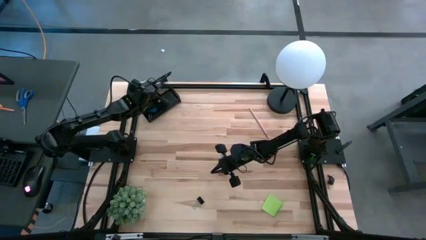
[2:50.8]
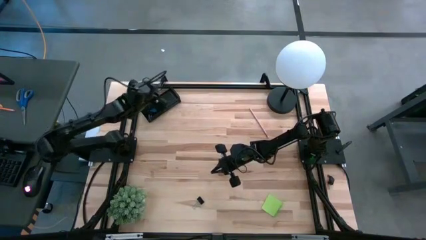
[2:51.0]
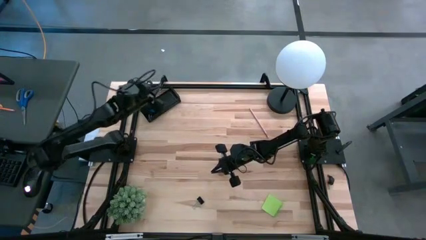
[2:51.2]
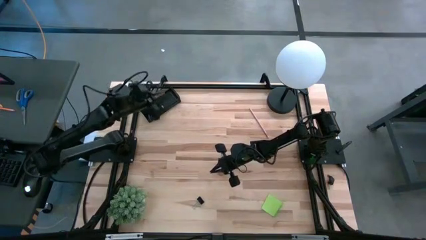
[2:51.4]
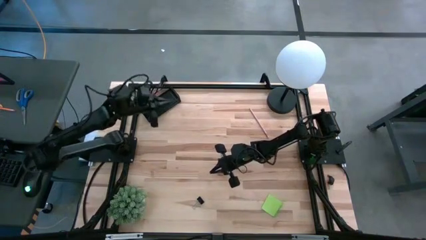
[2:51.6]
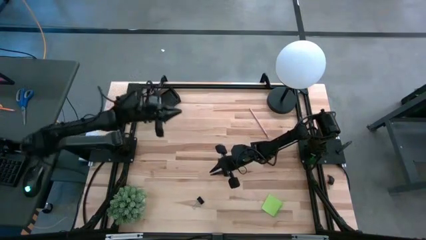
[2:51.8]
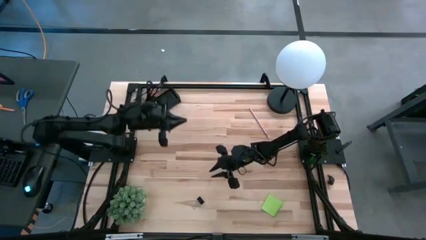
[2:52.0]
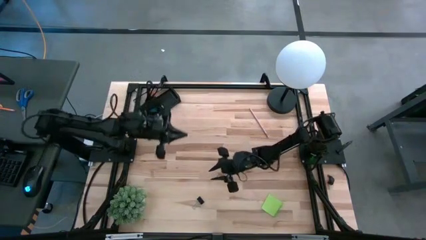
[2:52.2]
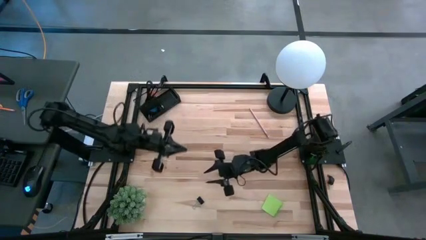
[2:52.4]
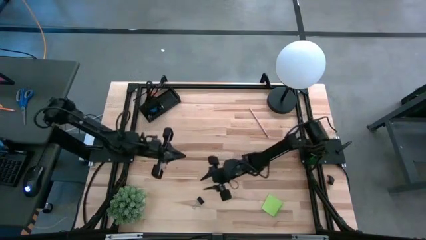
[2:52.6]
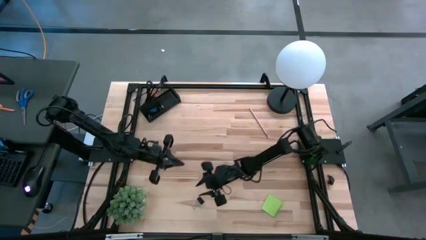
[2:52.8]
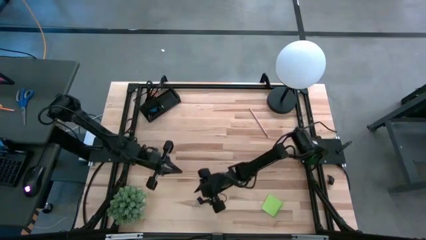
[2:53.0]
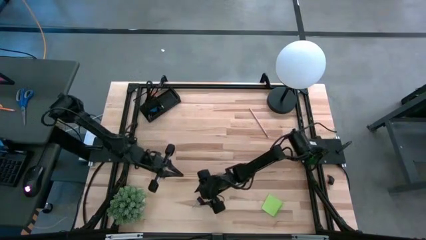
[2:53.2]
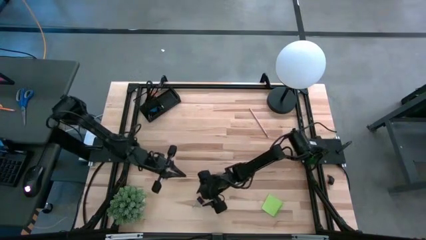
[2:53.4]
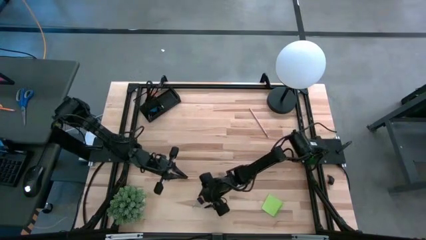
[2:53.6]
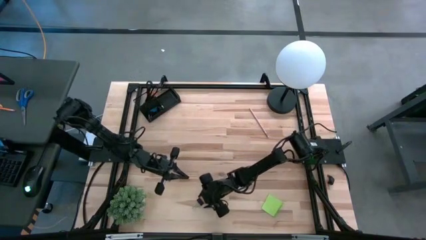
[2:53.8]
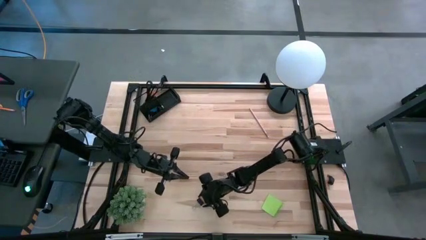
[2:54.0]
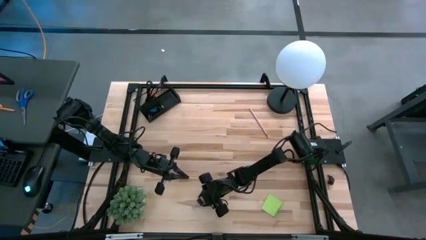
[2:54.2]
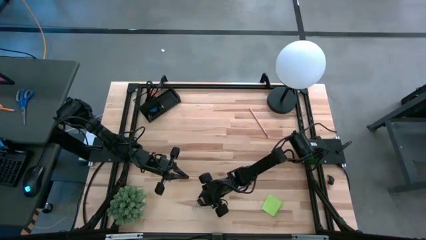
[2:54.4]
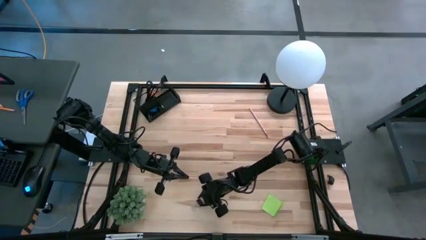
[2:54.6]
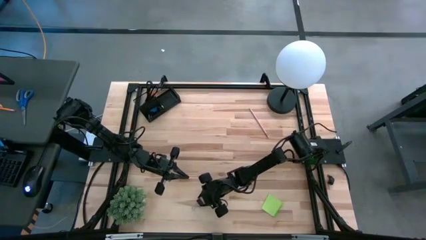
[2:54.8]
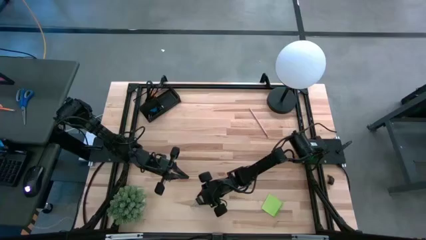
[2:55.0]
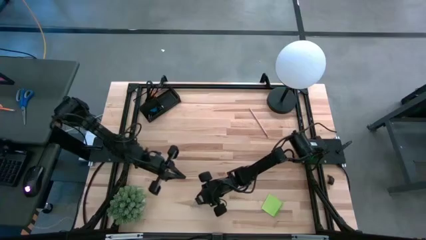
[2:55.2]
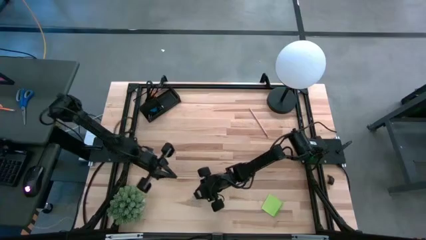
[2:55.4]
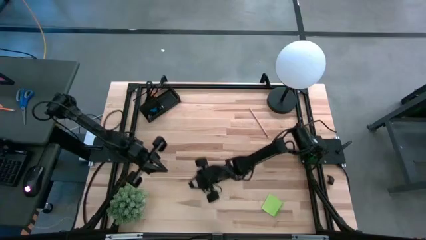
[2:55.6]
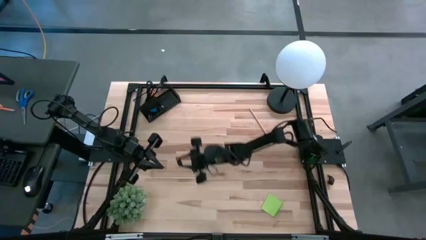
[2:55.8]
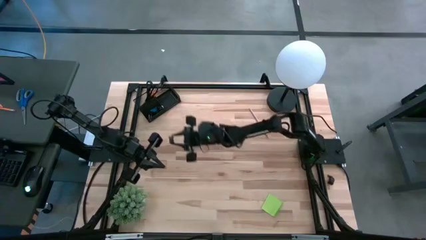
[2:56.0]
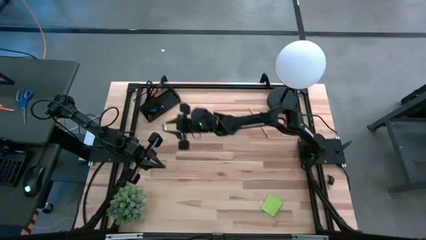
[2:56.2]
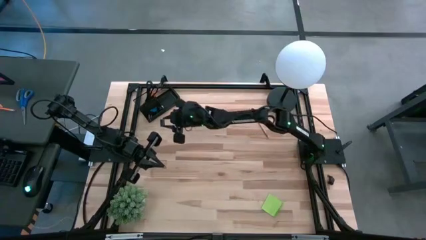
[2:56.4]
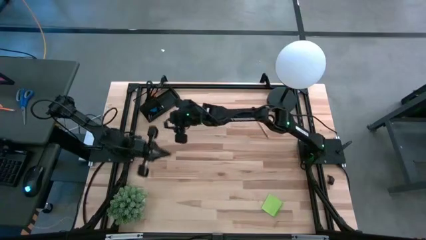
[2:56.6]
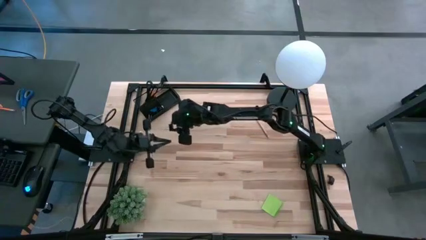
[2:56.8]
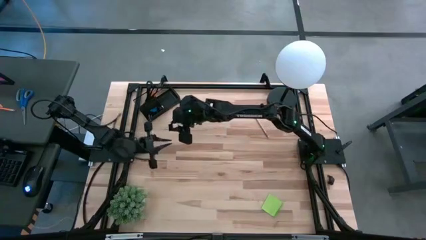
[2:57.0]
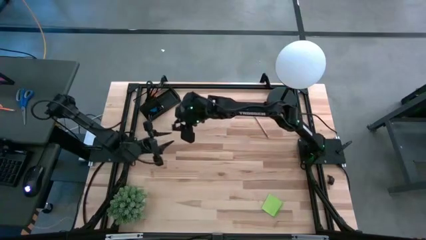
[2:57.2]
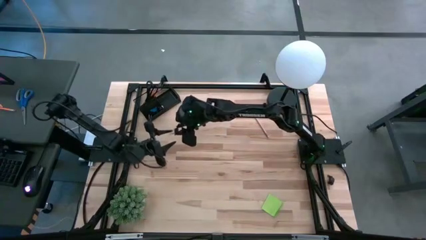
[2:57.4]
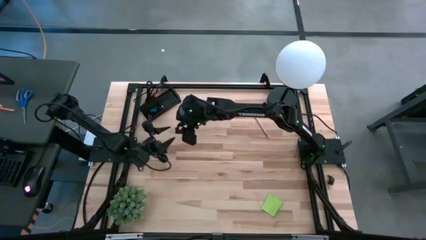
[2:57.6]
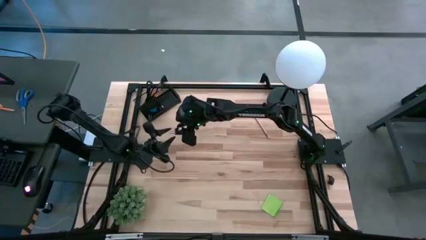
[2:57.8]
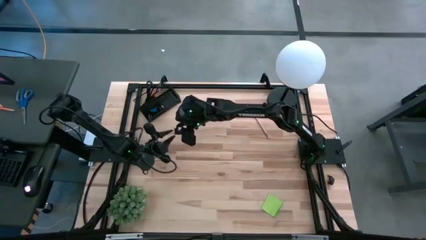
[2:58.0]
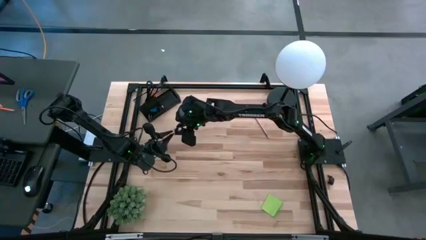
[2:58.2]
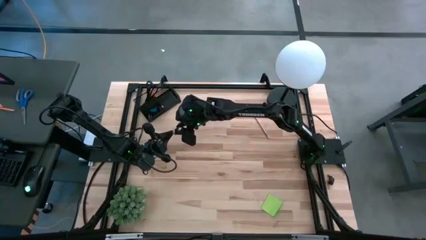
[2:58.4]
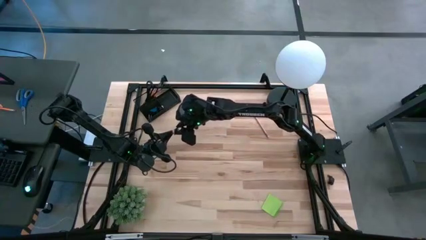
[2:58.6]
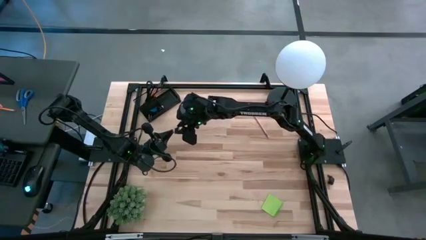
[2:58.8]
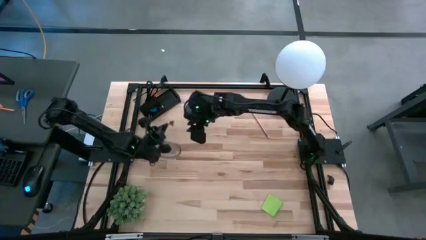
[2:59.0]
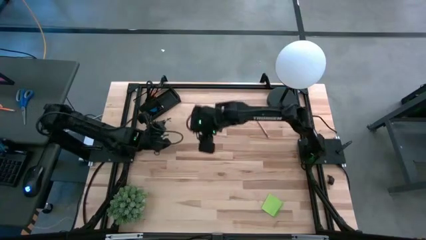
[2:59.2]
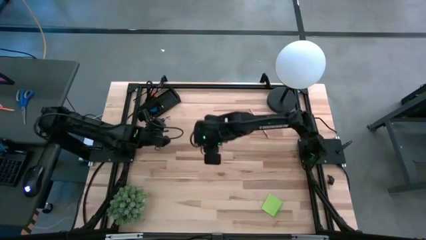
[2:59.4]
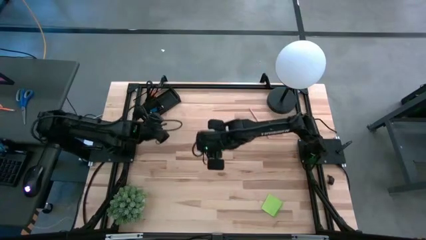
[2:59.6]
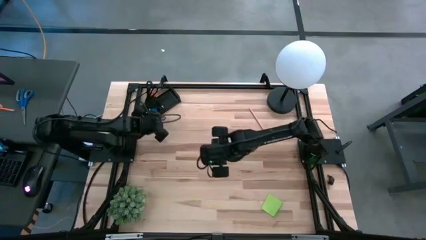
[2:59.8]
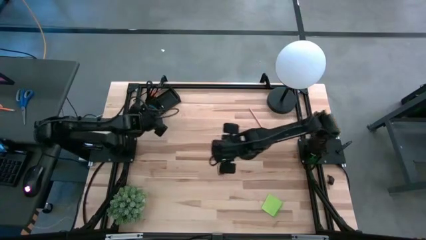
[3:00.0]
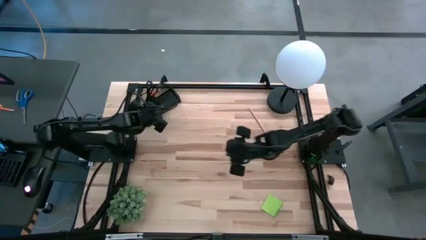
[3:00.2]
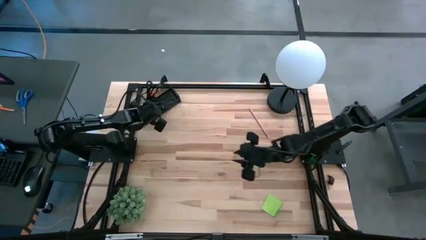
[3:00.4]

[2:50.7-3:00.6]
Task: Pick and place office supplies into organizer
Put the black binder clip into the black desk organizer

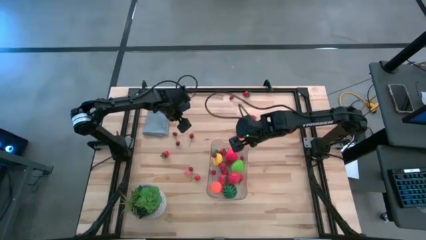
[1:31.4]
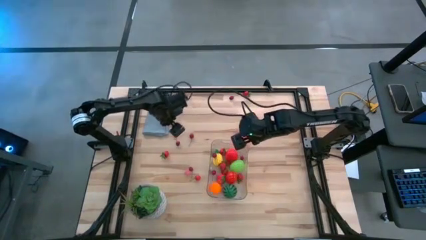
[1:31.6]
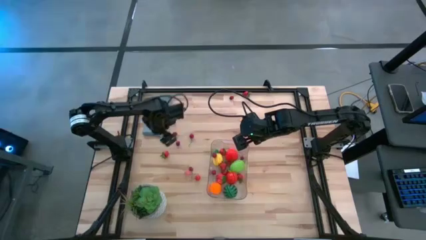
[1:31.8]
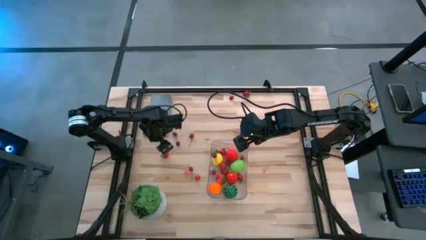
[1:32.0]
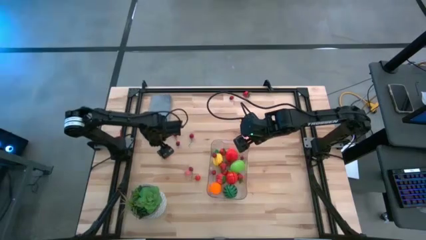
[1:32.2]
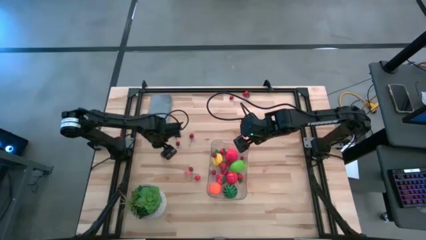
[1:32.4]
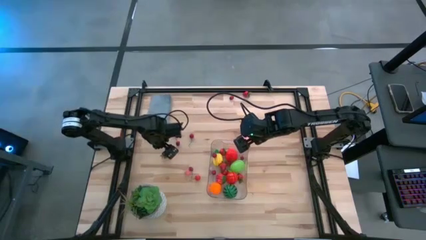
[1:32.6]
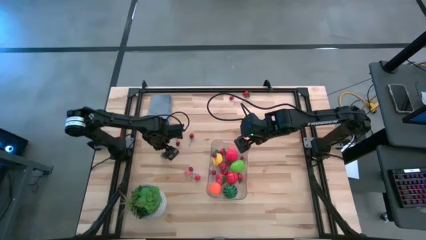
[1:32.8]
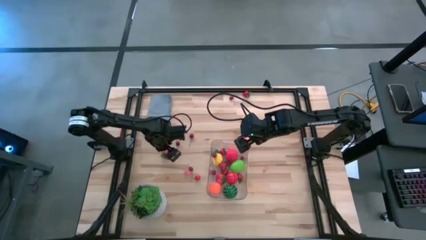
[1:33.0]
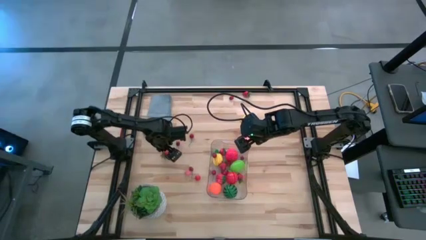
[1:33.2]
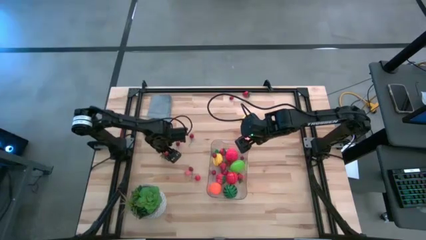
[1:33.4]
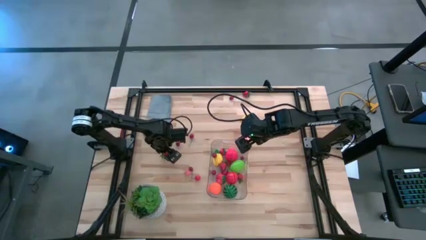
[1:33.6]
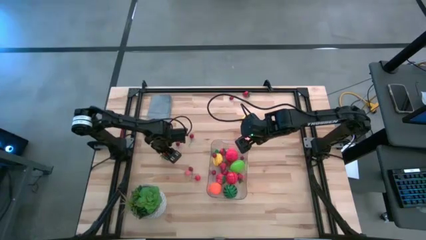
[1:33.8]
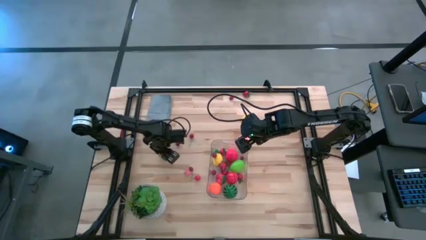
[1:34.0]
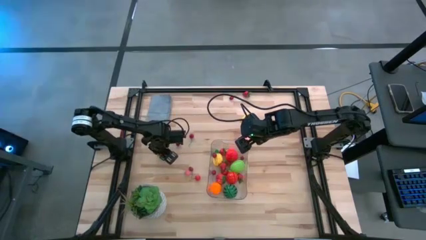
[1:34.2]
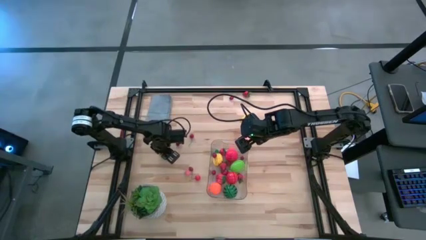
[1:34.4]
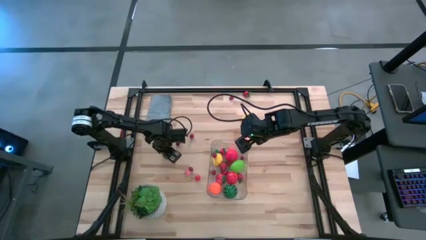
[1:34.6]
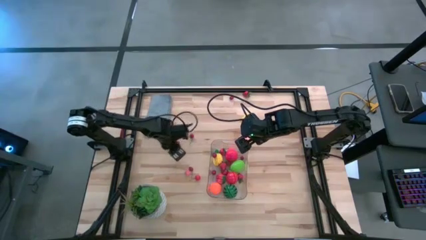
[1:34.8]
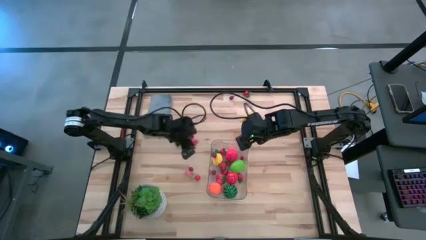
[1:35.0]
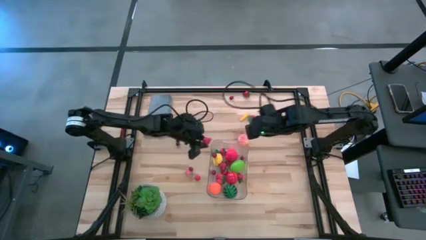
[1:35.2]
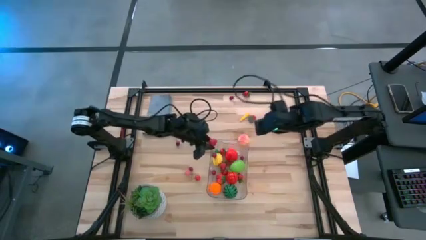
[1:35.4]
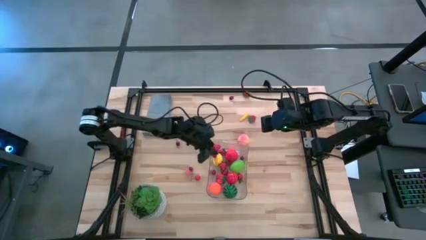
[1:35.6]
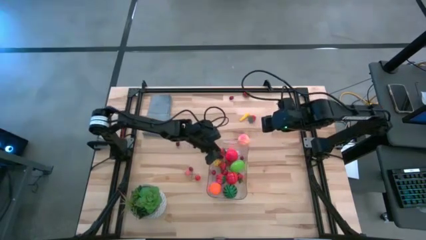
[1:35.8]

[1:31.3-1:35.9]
Task: Pick and placing Produce into tupperware
Put the strawberry into the transparent bin

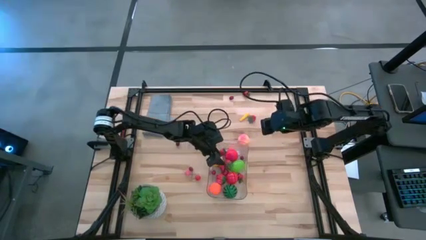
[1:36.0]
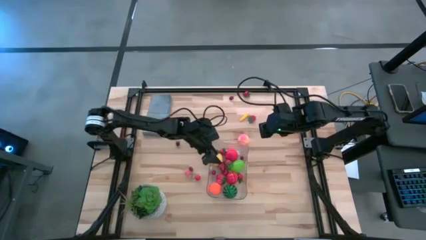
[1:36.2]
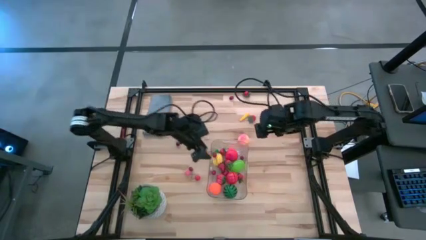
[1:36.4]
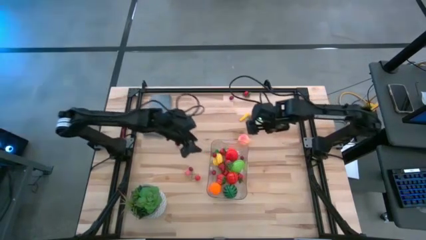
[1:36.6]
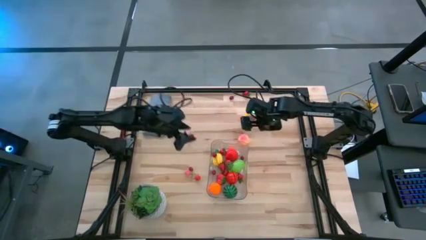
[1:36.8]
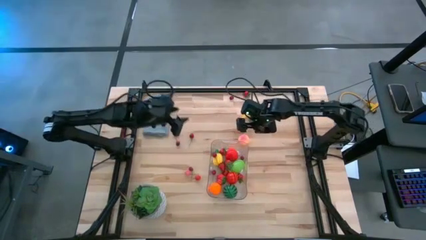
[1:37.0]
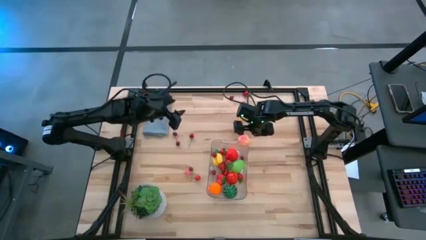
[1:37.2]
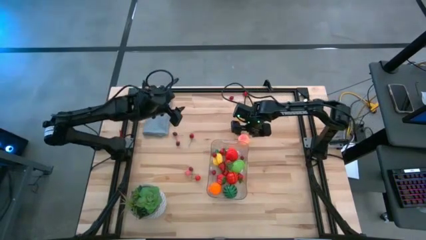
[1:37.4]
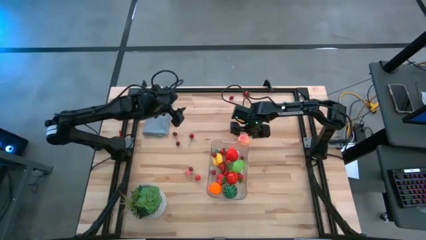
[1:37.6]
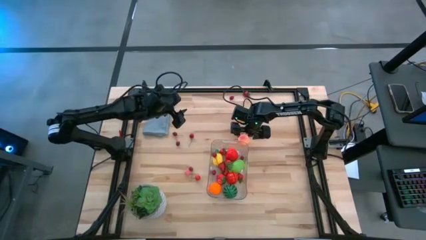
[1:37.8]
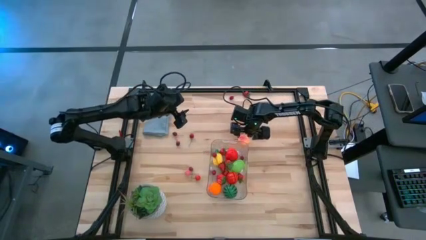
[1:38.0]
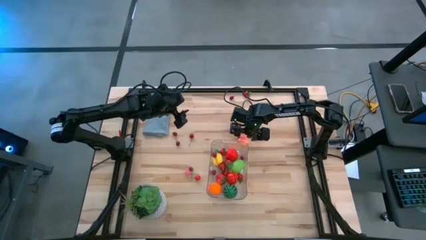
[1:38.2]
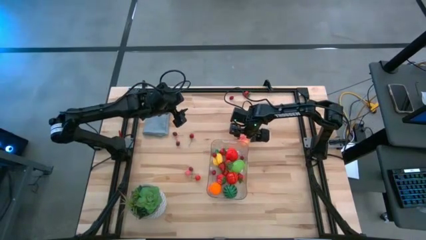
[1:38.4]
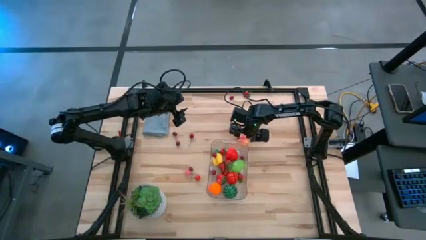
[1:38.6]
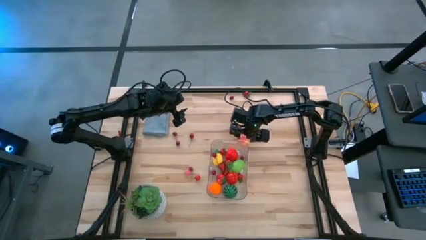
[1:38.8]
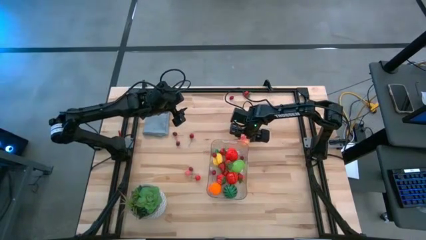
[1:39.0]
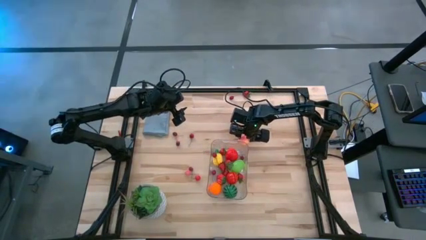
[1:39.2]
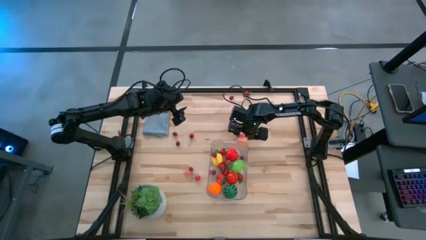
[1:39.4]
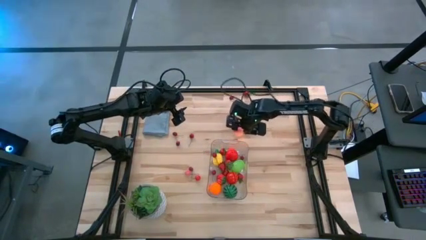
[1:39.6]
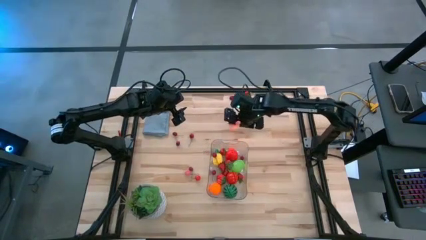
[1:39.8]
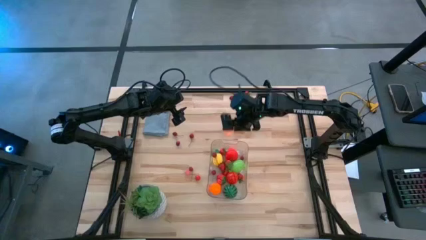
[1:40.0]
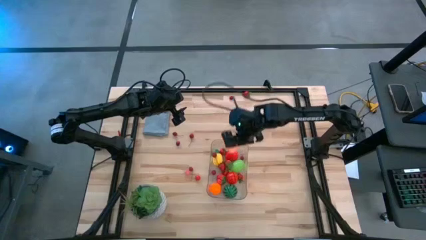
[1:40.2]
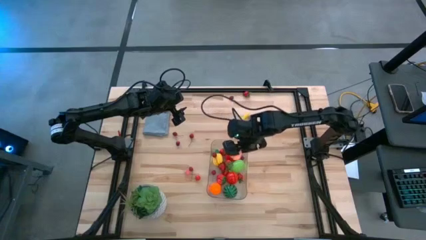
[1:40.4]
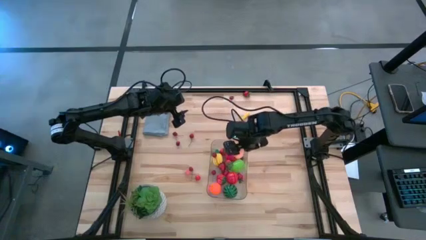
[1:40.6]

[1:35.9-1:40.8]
Put the top peach into the transparent bin
